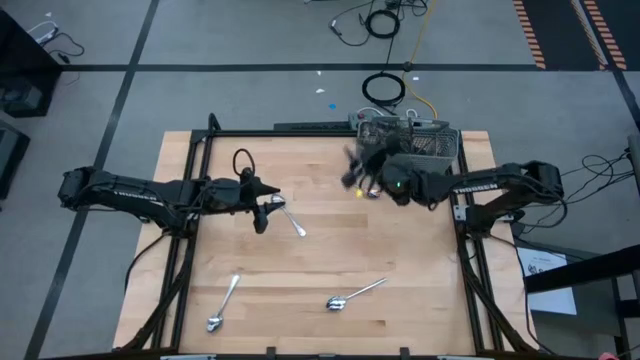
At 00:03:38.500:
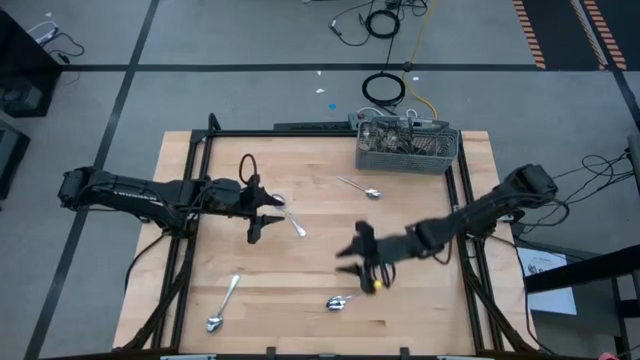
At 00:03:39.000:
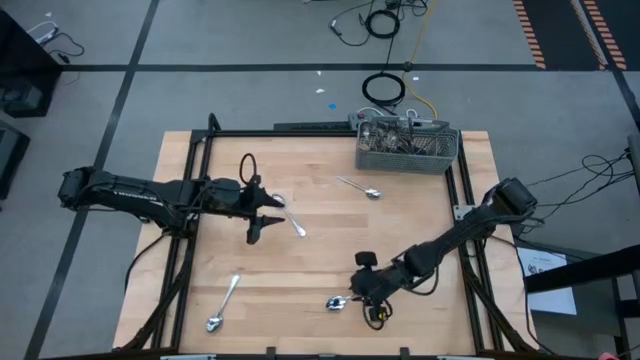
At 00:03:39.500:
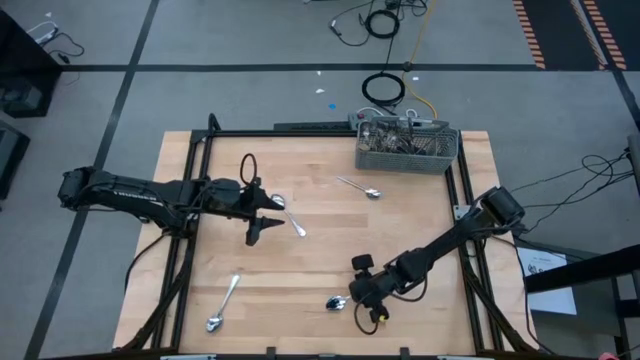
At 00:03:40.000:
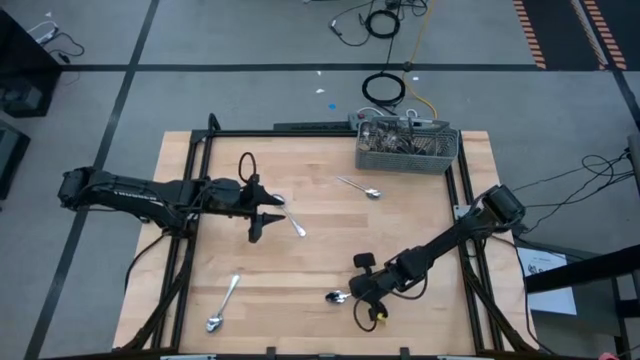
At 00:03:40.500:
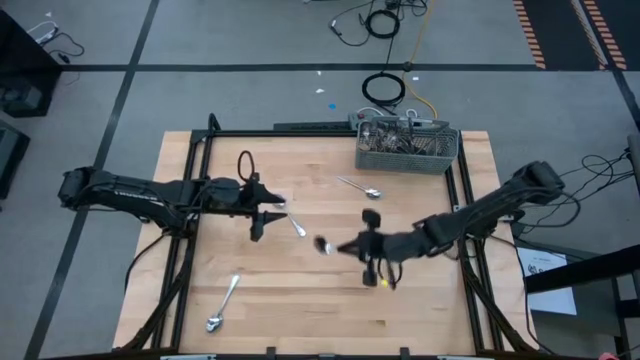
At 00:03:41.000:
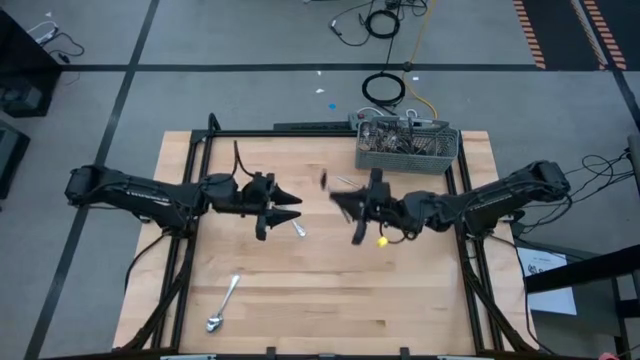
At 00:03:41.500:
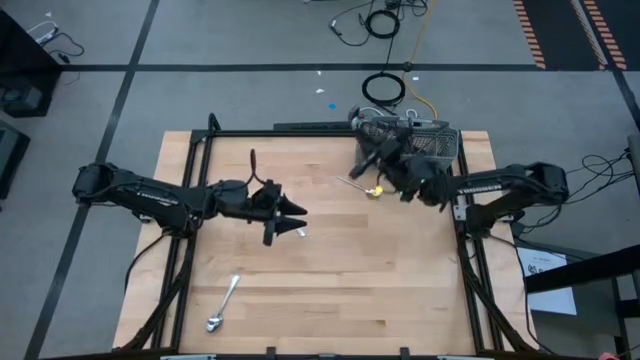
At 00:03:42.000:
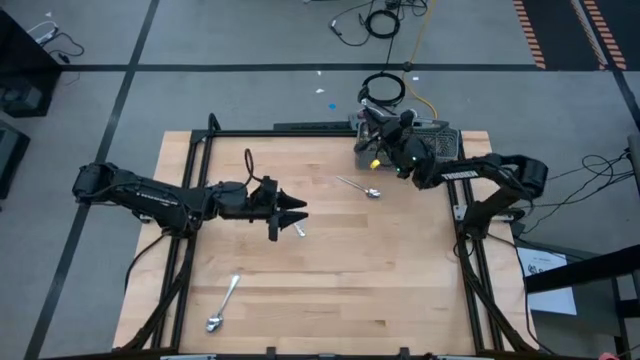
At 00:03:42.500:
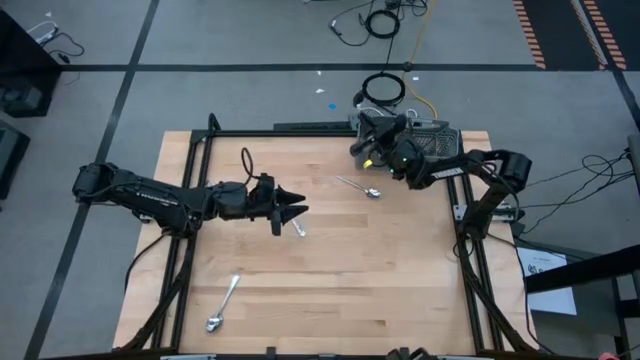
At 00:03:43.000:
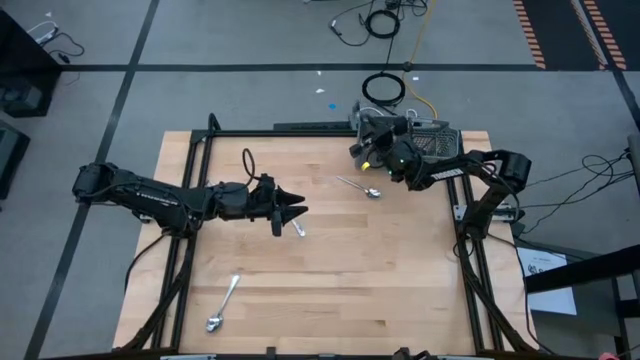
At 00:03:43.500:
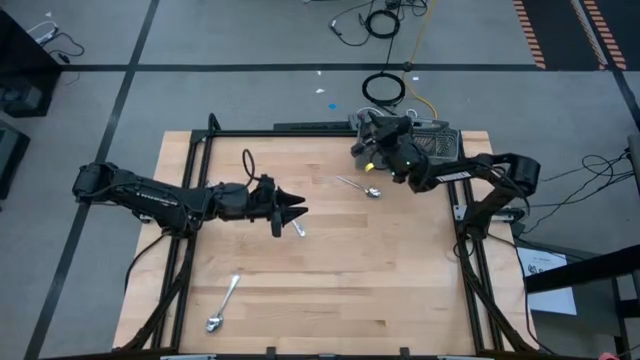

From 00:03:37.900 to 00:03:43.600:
Task: Sort silverware
Put the silver spoon into the gray utensil holder

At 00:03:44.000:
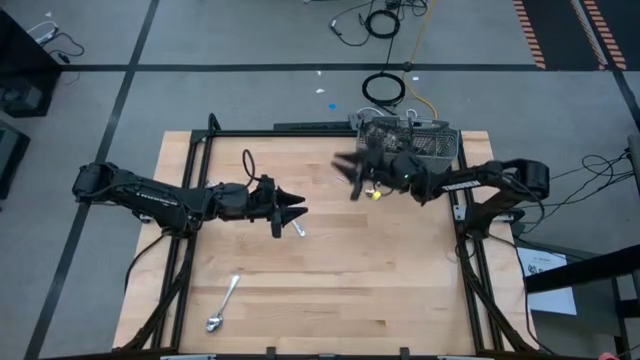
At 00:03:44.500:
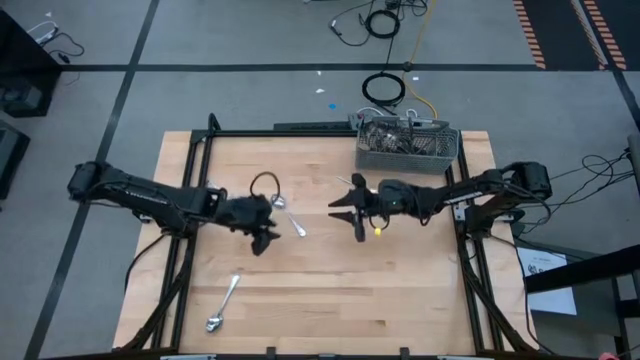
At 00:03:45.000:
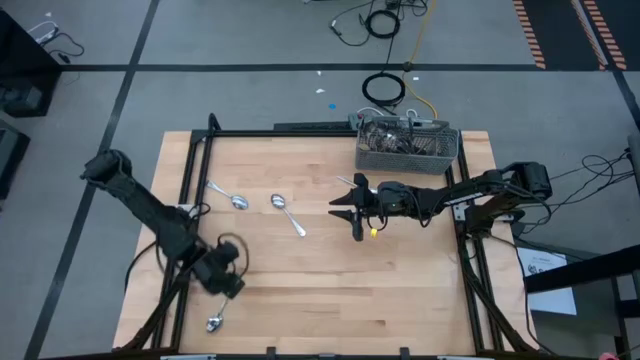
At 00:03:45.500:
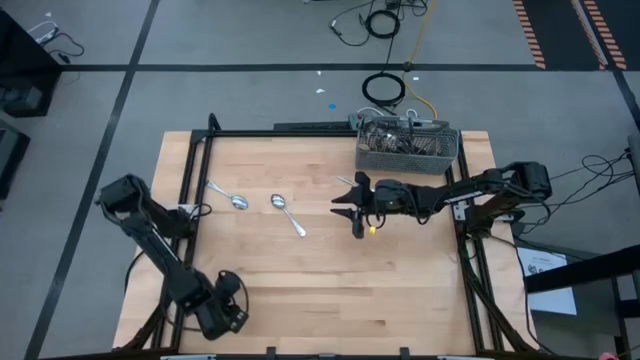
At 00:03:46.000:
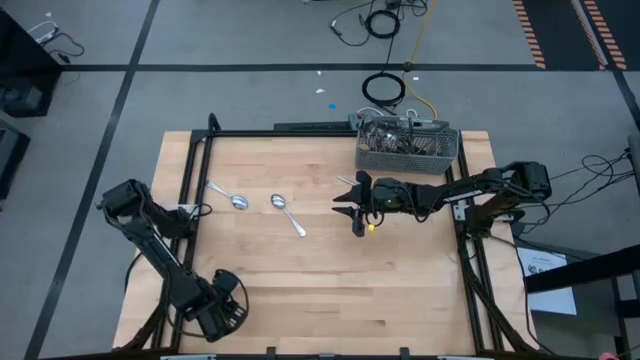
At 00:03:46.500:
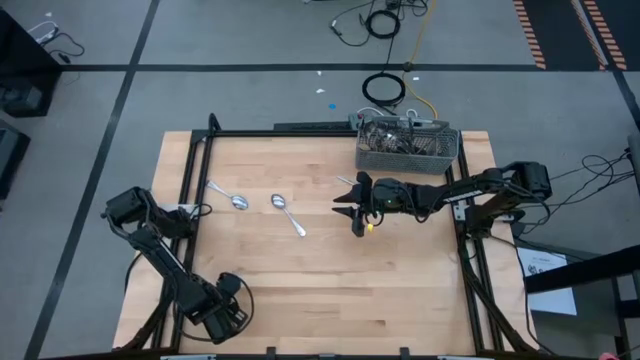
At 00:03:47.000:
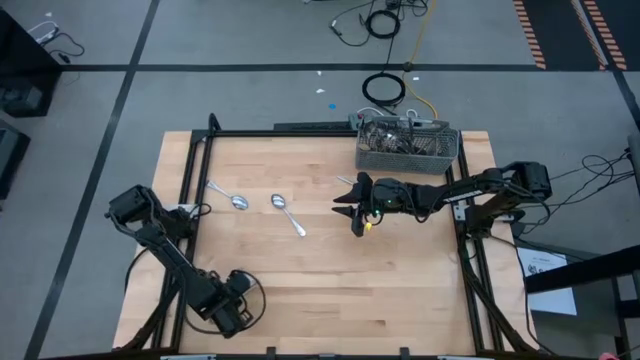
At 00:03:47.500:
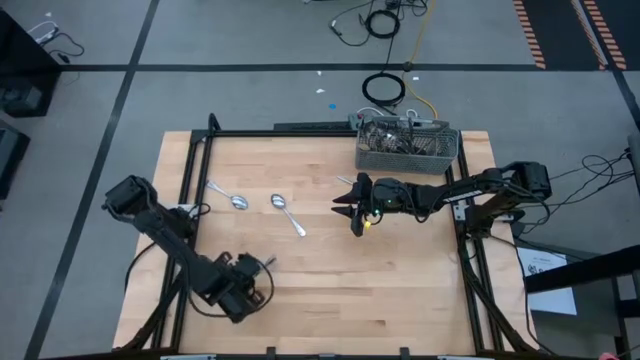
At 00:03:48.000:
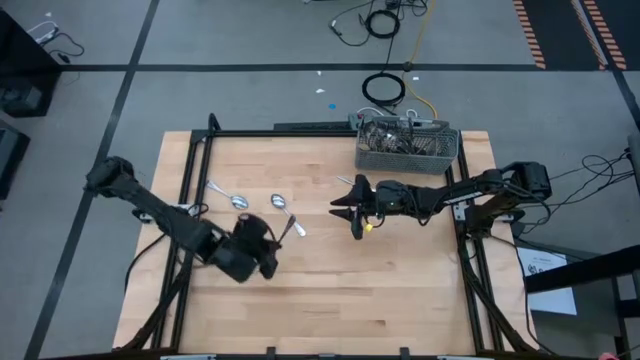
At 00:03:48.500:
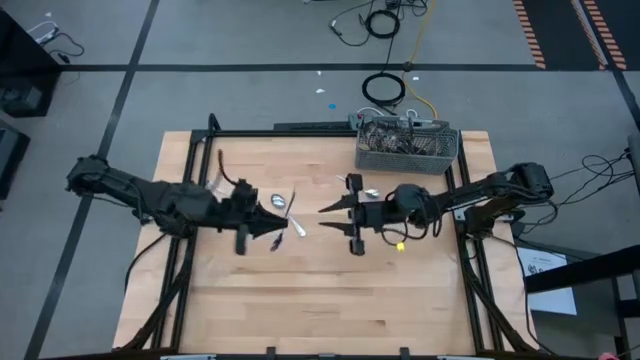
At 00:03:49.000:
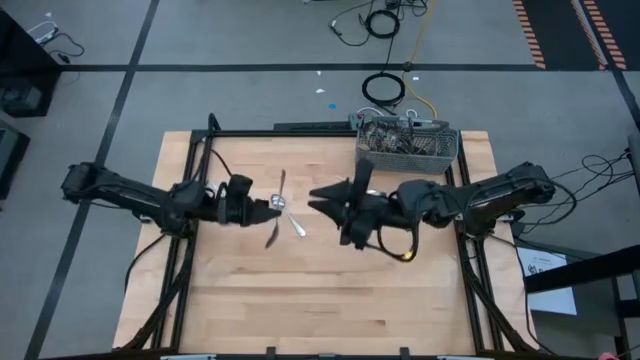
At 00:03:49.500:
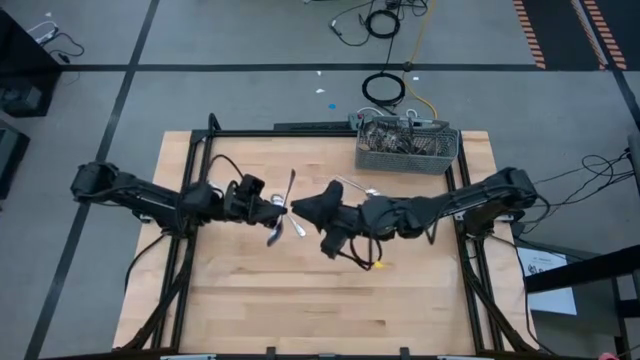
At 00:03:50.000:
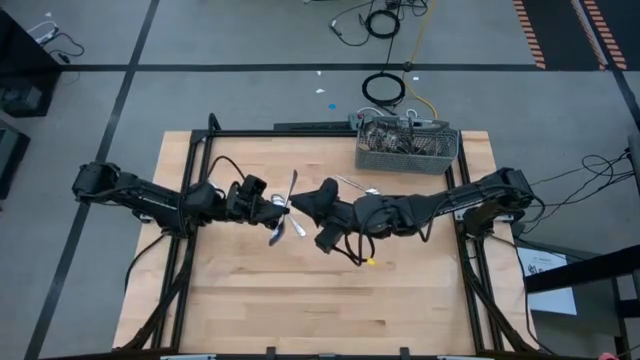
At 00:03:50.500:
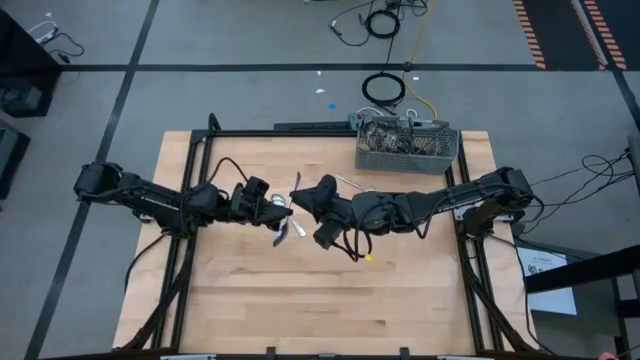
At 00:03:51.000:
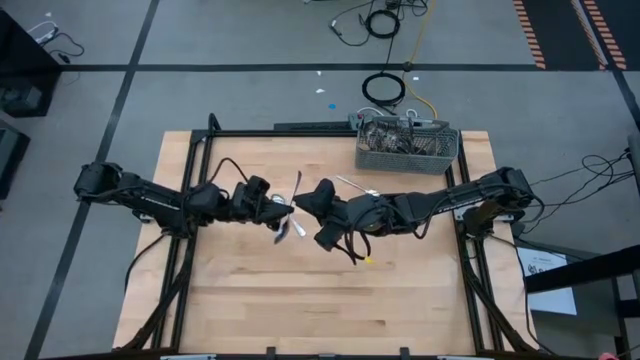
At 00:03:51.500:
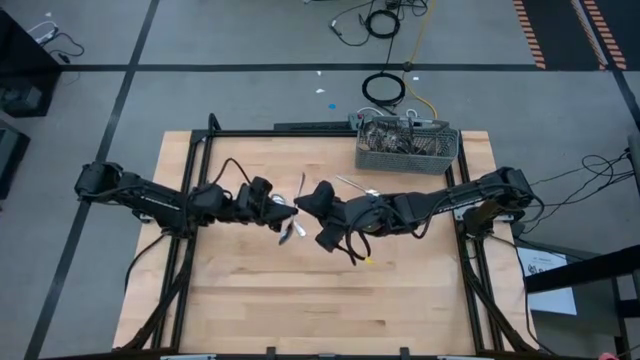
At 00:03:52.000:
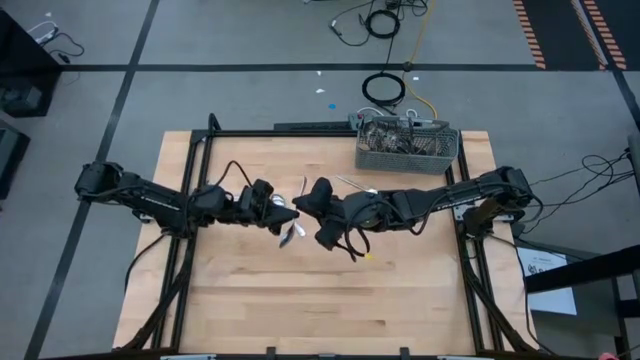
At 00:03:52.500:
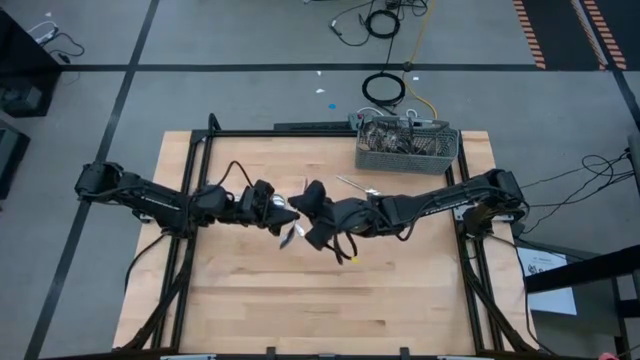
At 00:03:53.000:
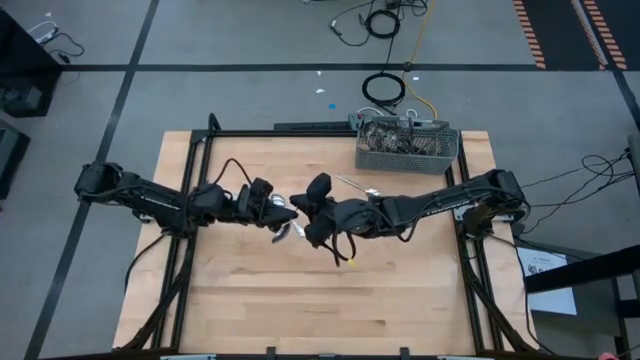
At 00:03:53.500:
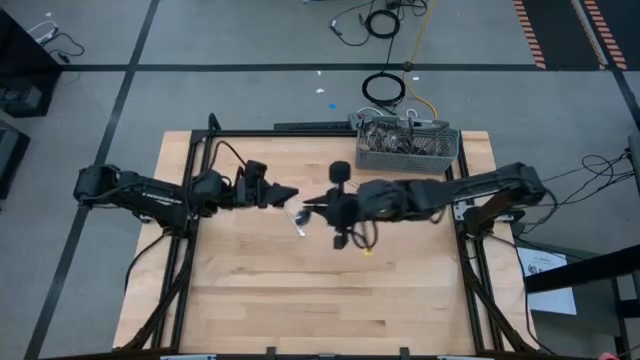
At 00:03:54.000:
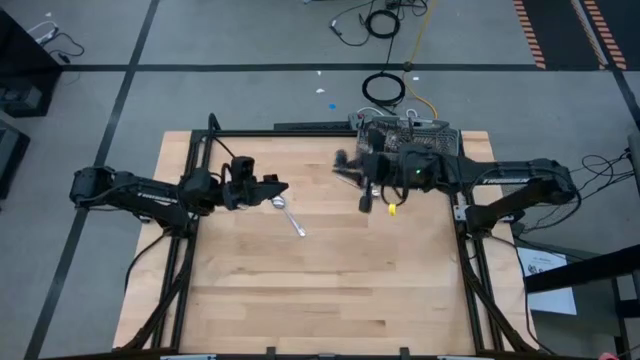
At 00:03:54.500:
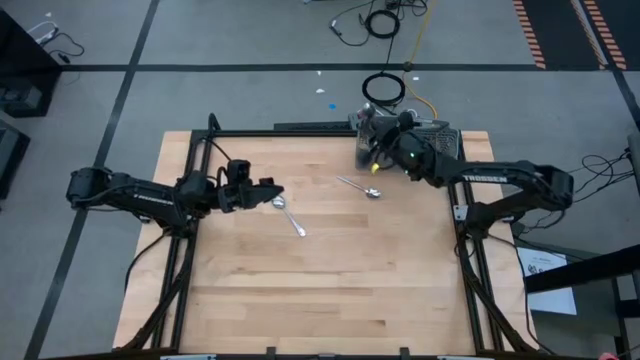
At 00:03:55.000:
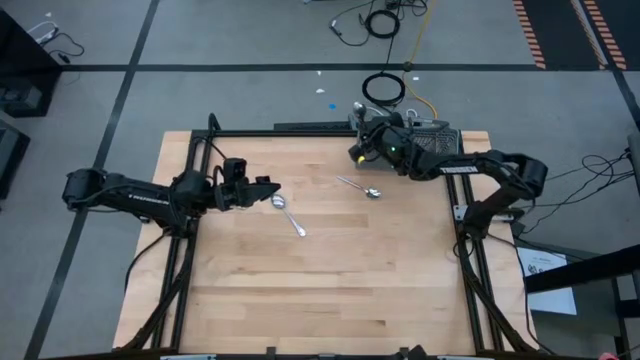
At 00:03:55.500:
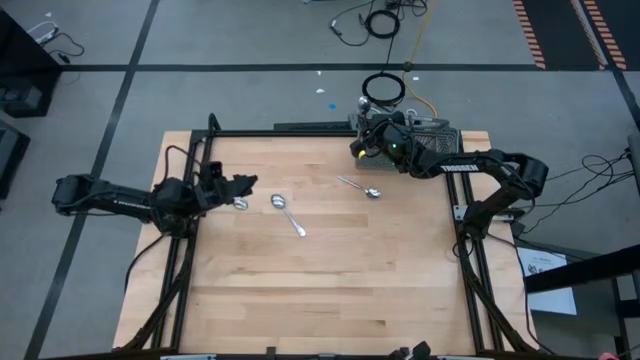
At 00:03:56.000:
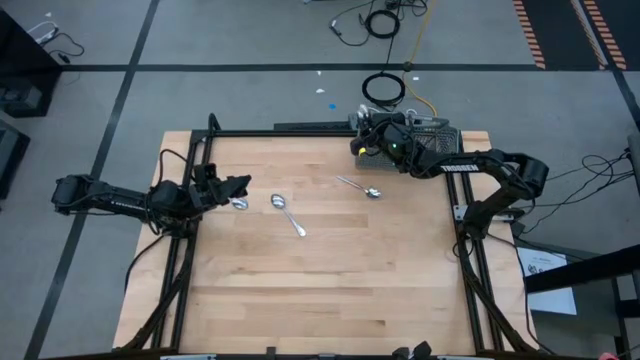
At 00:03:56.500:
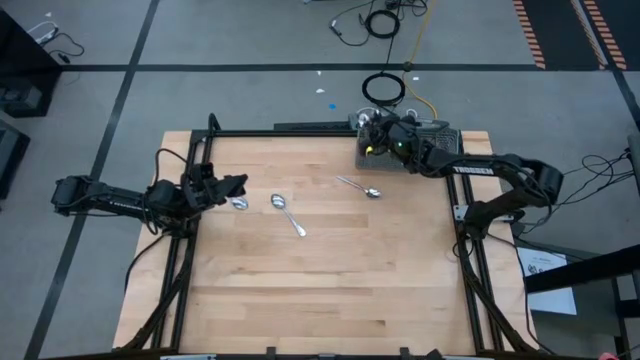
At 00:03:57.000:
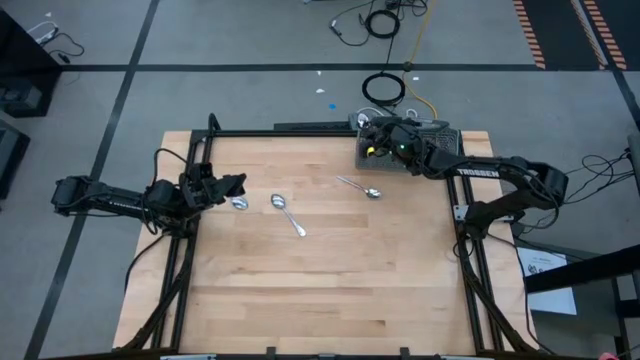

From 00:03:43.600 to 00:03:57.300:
Put the silver spoon into the gray utensil holder
